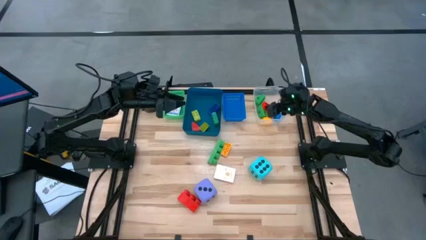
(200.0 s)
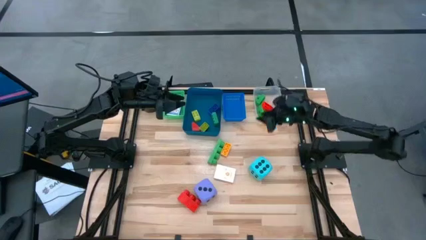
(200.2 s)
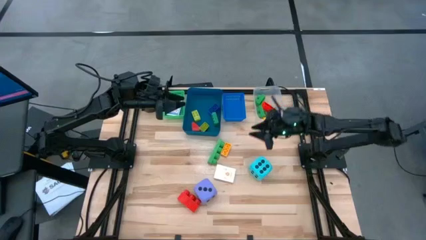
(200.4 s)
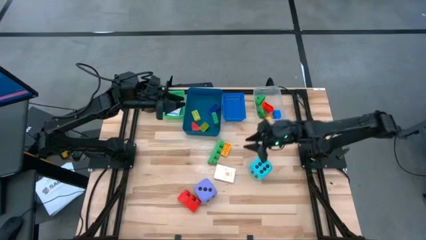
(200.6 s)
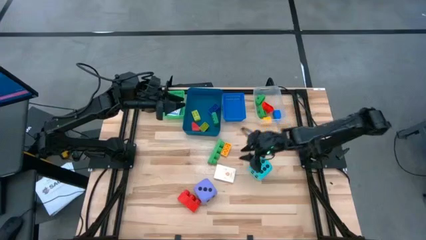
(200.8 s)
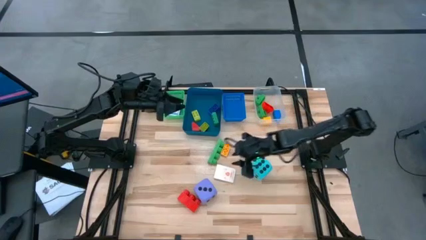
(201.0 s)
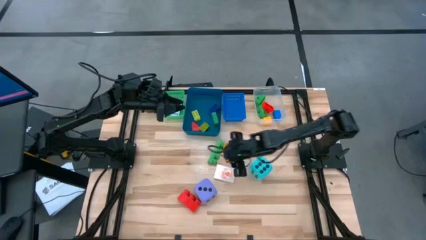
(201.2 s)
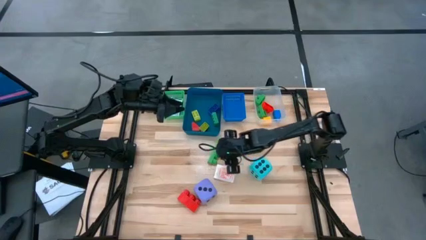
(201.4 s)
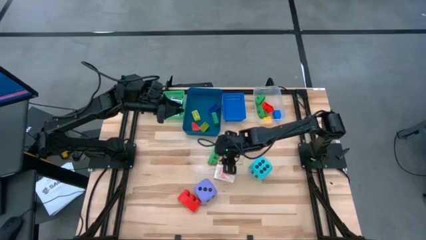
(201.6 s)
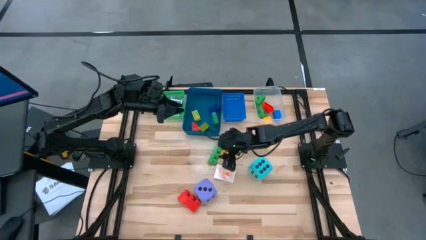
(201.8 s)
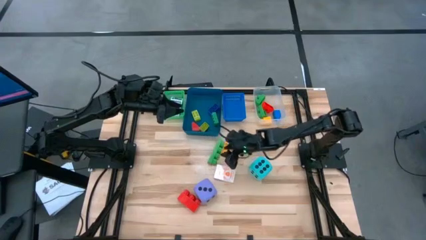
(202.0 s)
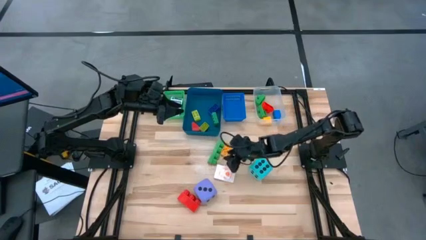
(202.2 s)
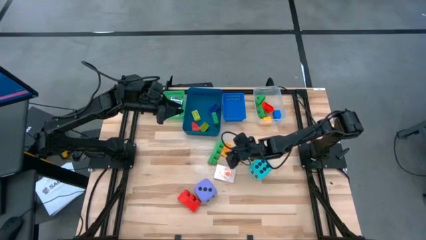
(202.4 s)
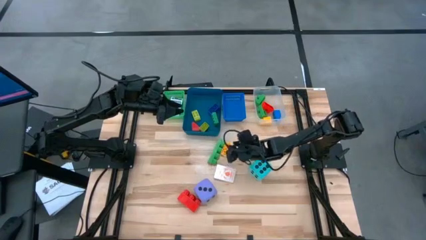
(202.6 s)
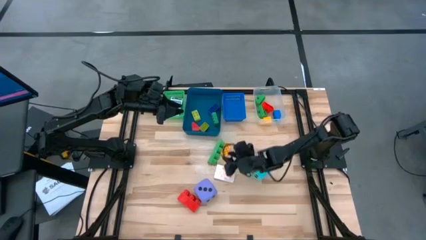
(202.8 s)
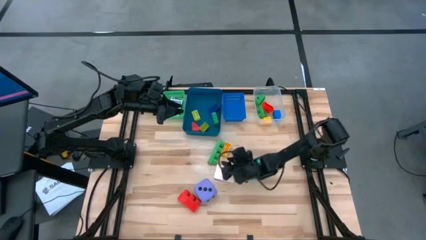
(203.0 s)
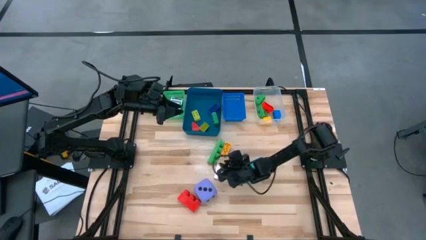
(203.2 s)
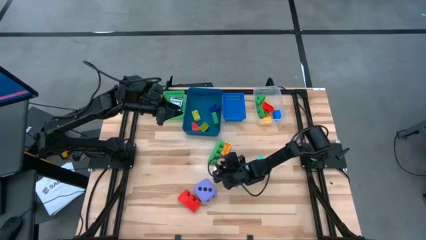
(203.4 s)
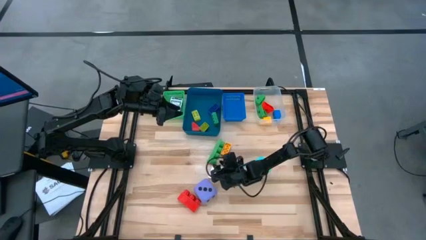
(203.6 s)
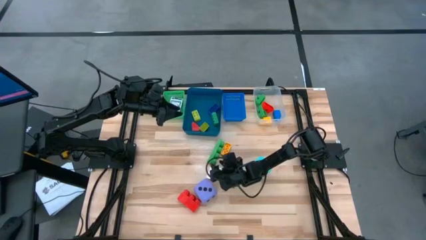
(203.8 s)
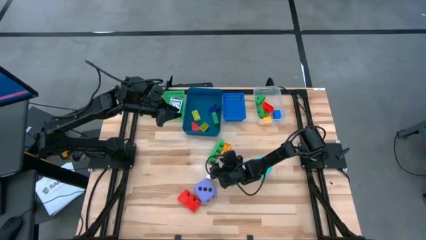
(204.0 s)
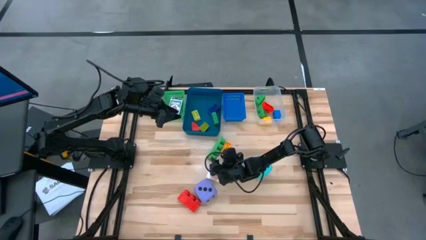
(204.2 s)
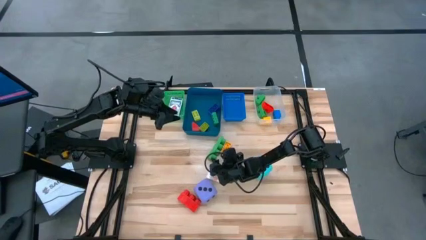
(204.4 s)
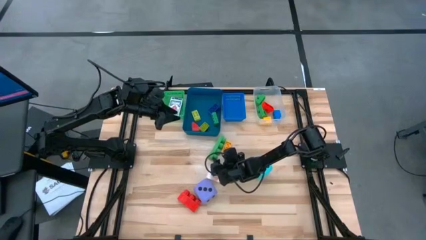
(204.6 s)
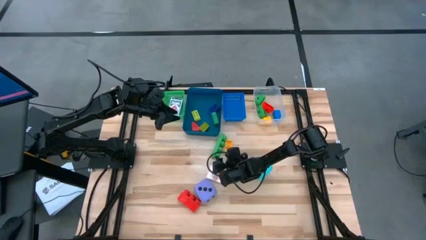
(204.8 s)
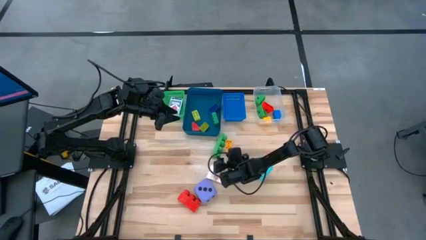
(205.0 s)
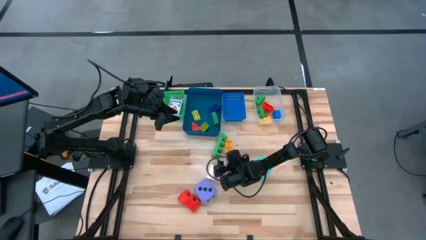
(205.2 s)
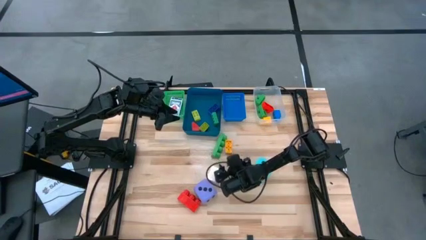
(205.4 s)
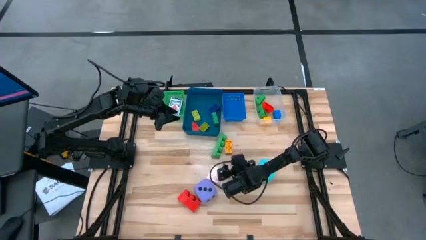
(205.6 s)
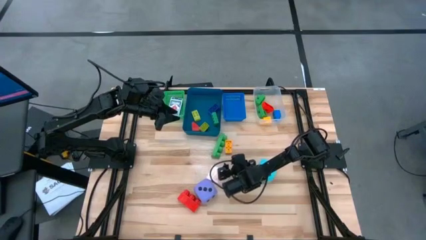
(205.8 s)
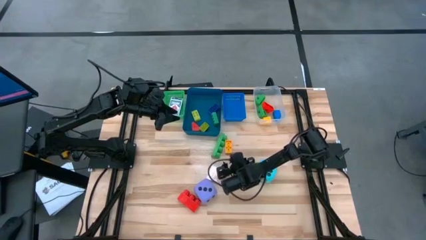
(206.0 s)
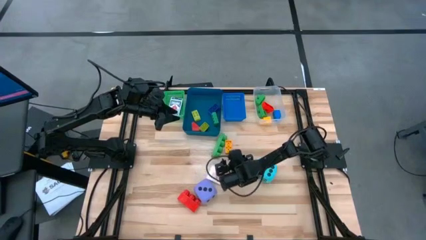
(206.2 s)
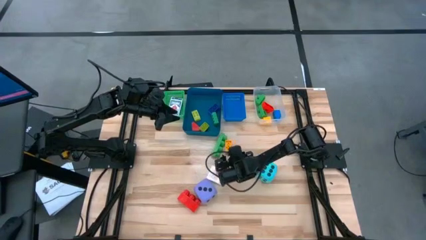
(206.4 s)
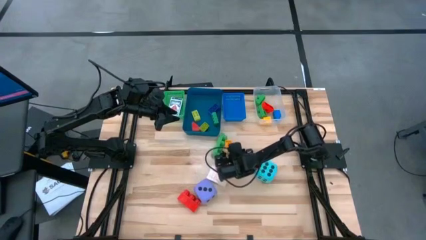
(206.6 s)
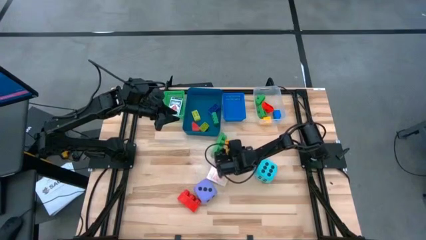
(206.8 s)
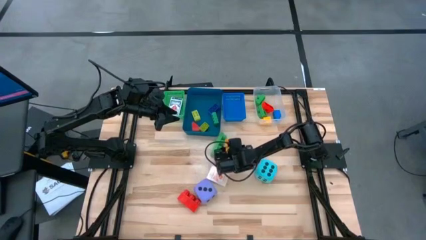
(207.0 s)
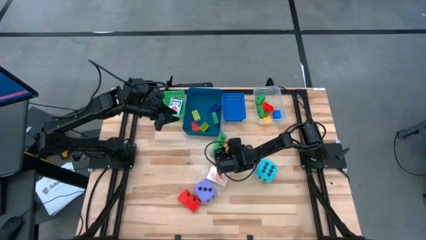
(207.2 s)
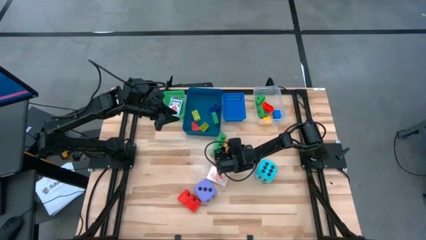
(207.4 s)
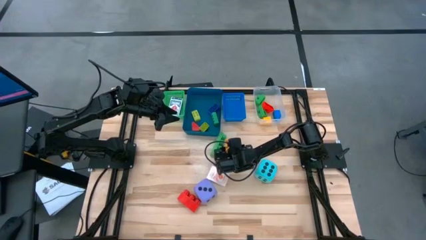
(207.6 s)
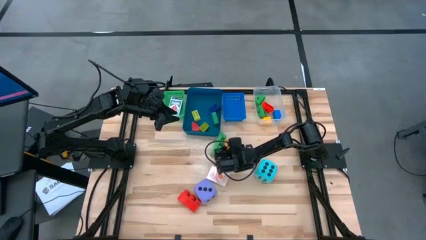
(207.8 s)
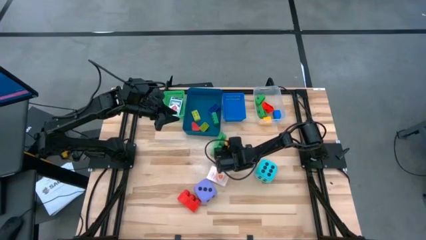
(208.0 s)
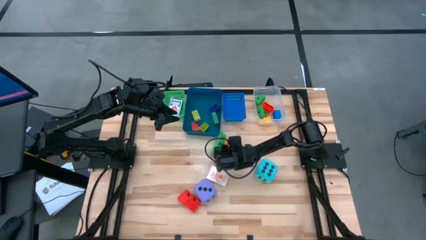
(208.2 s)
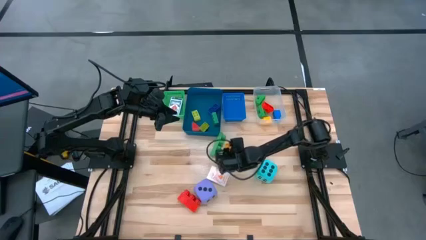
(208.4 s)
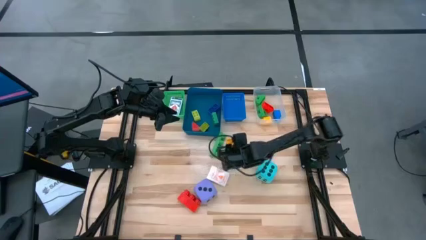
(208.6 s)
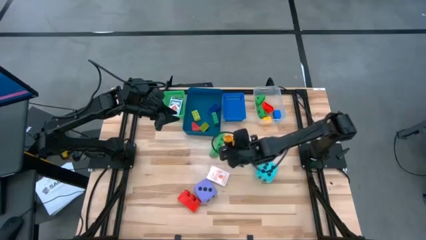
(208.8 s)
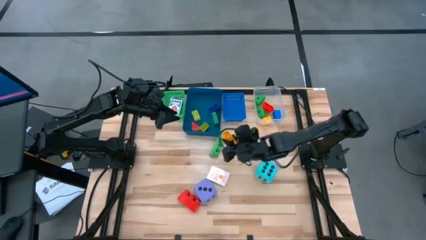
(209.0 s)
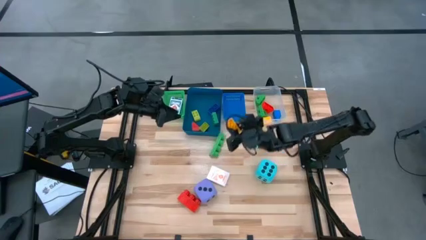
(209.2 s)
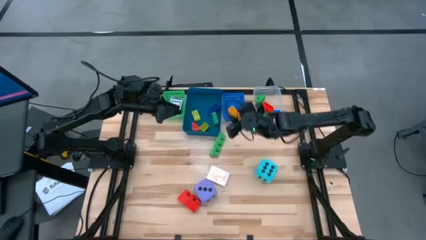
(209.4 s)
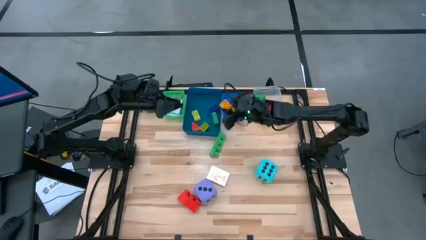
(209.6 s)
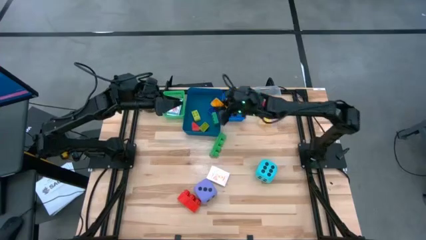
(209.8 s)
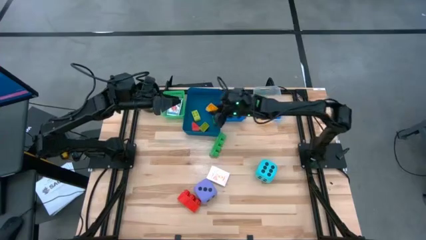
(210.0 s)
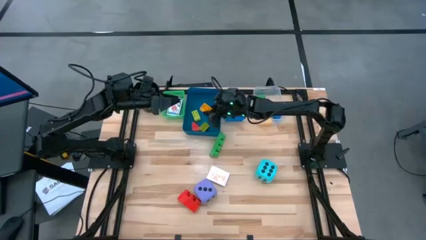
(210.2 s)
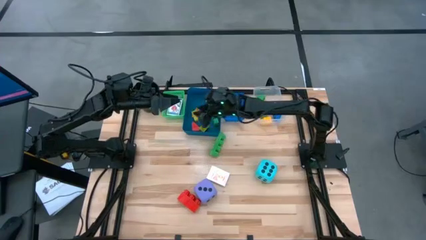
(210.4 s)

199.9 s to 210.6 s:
Task: Pick & Place Toys
Put the small yellow game piece into the dark blue bin

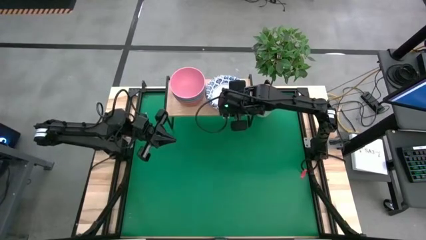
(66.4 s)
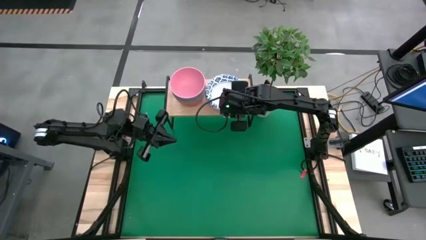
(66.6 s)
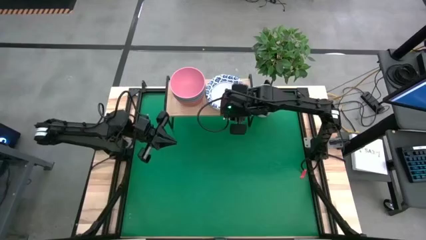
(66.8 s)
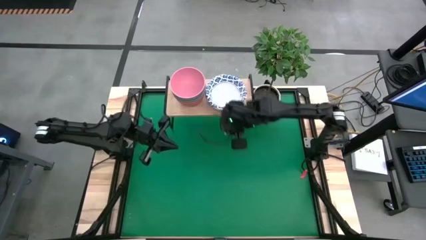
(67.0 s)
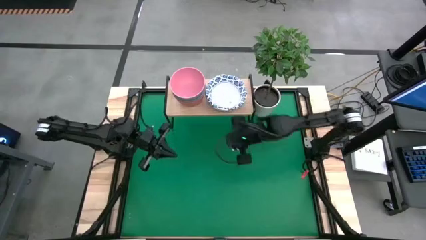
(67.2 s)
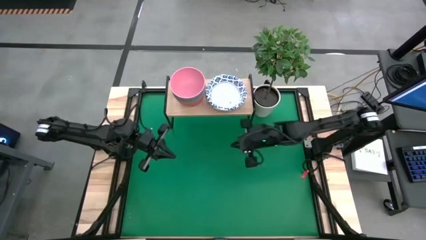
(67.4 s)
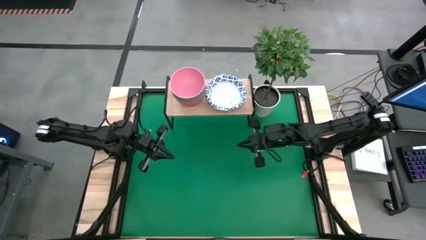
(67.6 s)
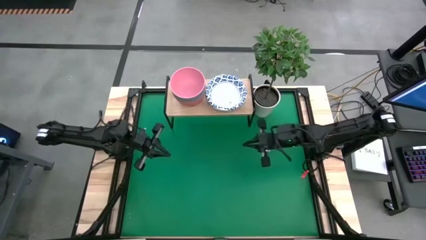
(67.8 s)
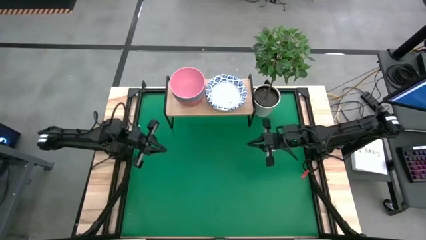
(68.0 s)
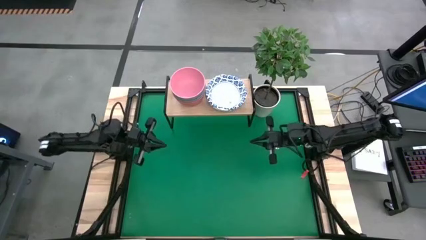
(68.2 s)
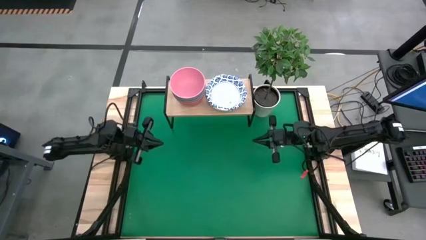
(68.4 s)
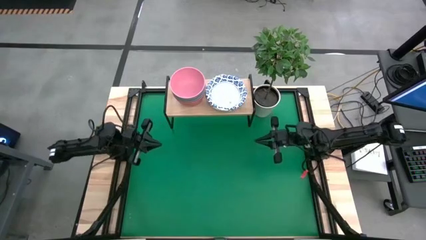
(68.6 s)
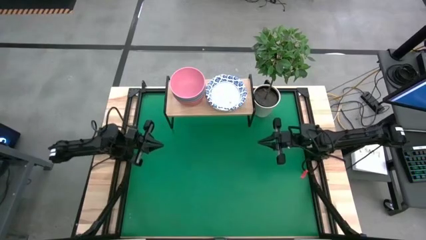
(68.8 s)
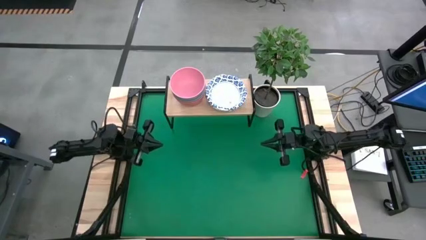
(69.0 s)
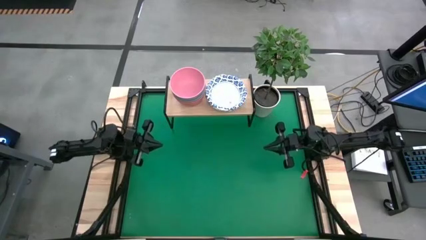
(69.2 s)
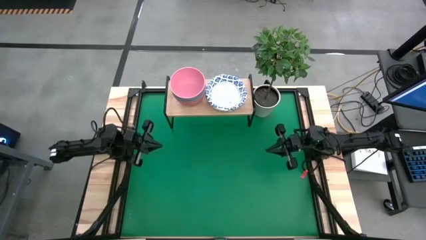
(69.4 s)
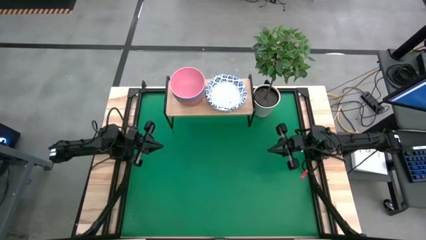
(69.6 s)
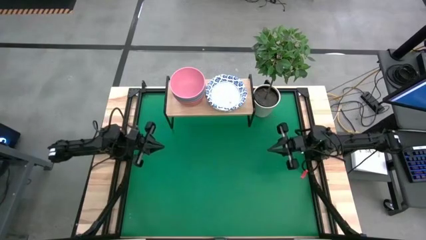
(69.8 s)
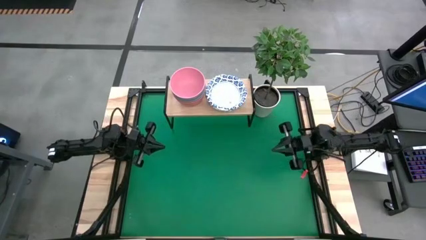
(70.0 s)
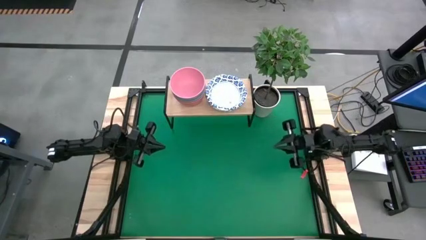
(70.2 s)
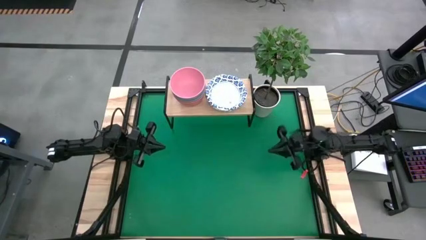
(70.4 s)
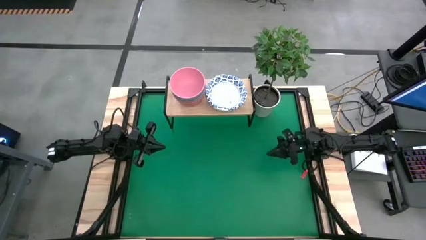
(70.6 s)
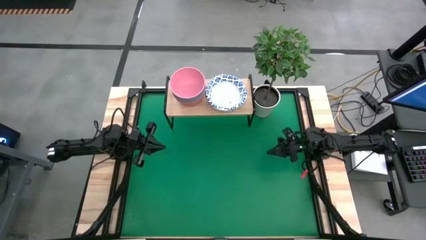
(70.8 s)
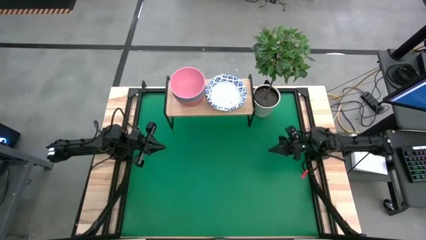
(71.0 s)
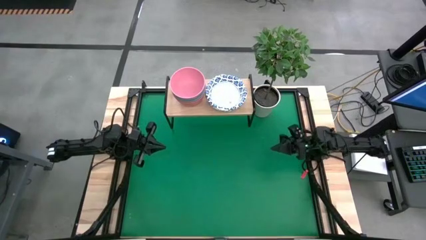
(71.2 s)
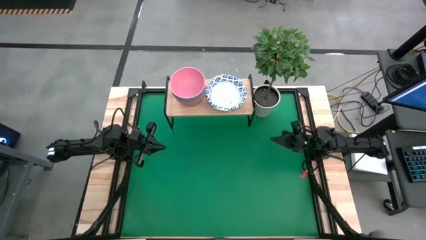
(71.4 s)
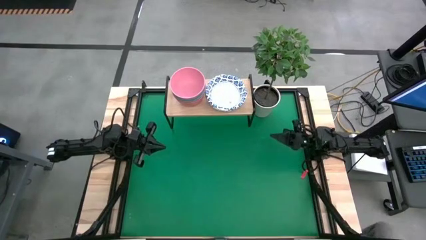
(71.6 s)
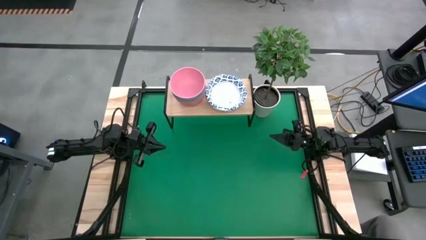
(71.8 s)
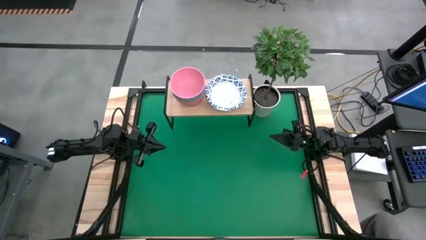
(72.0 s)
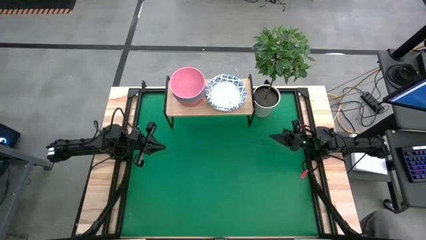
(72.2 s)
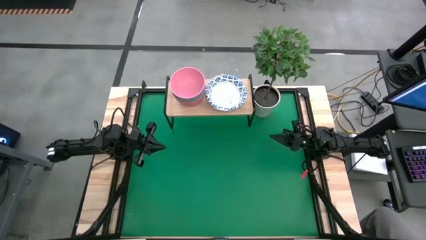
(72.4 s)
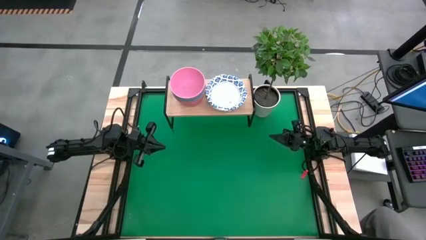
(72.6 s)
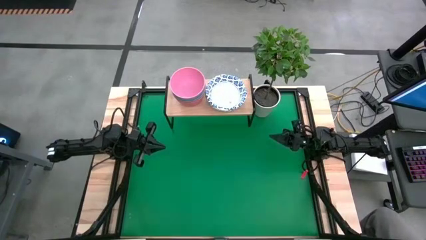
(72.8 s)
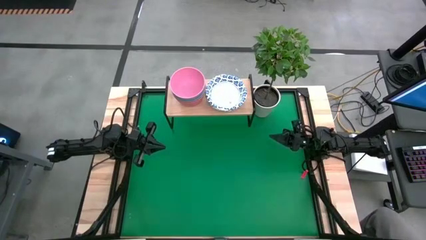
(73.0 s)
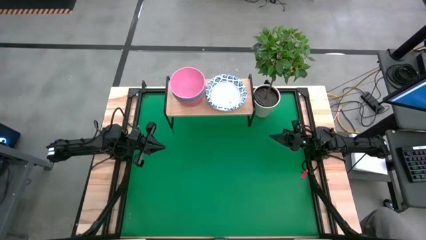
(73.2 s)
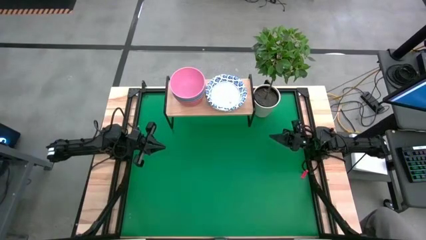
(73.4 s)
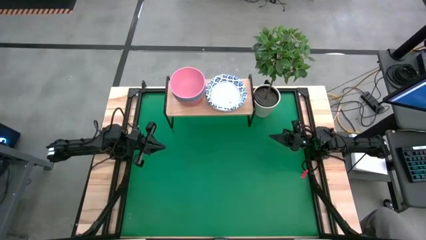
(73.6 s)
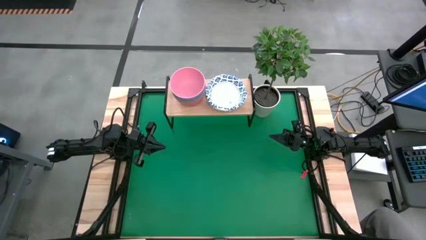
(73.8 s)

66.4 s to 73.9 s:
Task: Place and stack bowls onto a shelf
Return to Home Position
